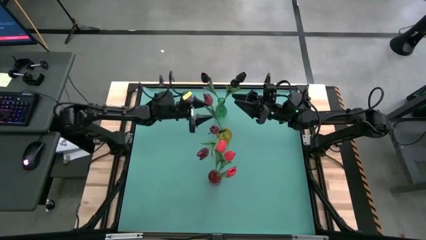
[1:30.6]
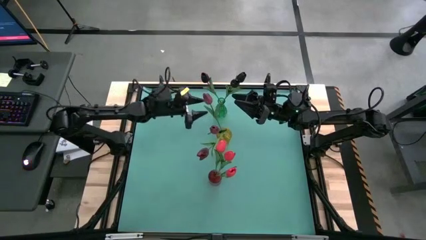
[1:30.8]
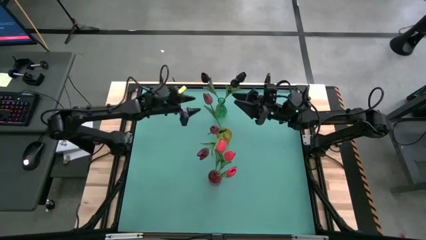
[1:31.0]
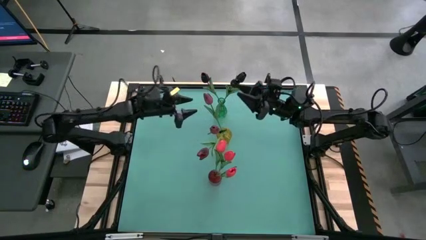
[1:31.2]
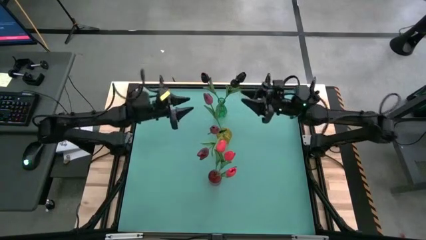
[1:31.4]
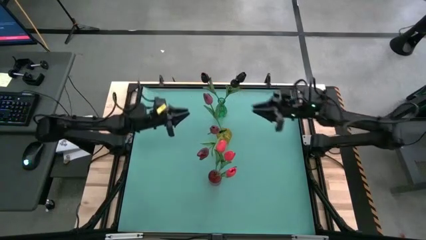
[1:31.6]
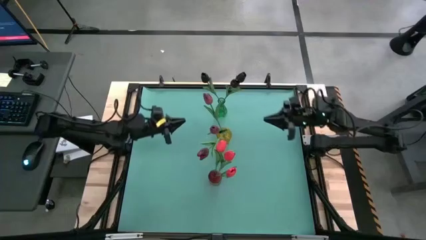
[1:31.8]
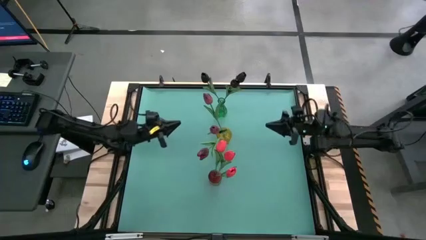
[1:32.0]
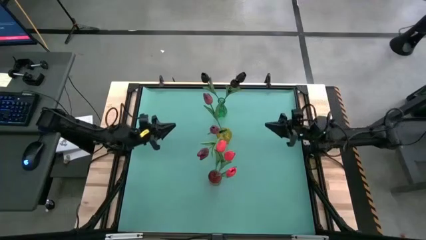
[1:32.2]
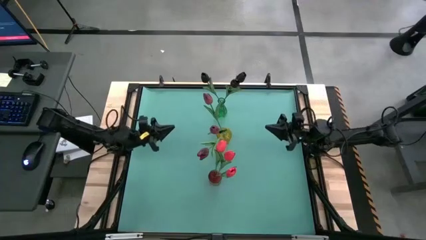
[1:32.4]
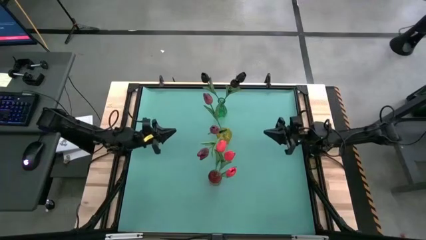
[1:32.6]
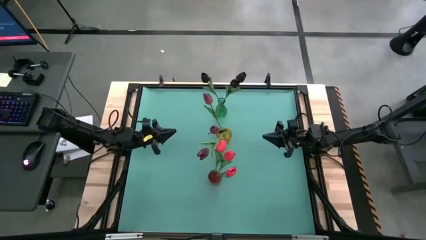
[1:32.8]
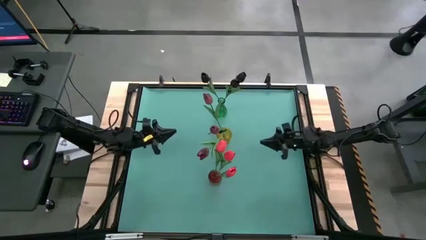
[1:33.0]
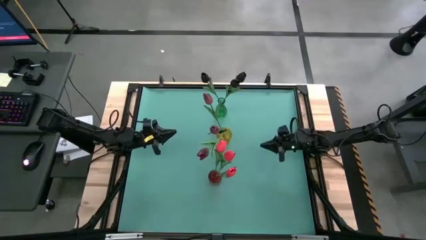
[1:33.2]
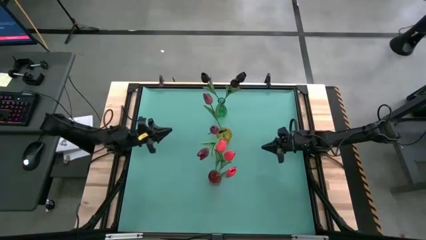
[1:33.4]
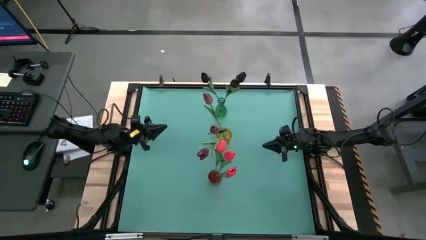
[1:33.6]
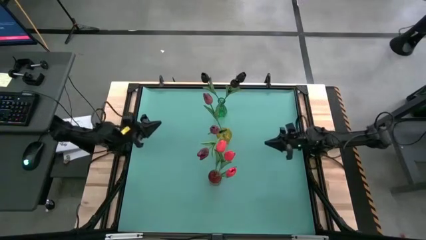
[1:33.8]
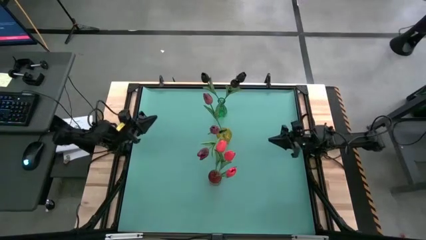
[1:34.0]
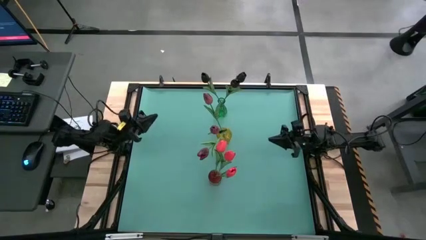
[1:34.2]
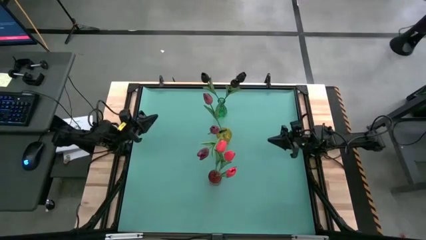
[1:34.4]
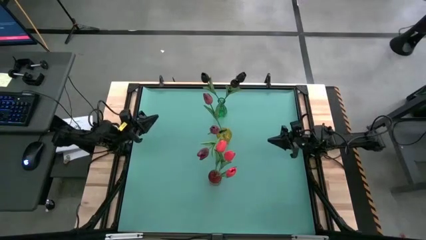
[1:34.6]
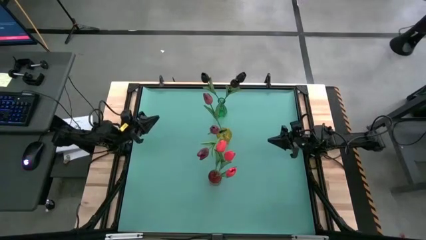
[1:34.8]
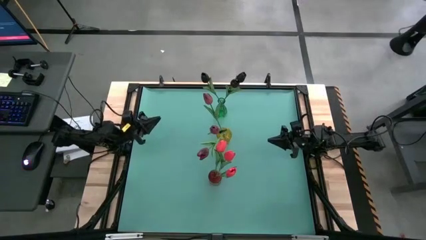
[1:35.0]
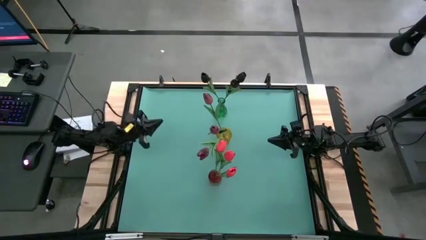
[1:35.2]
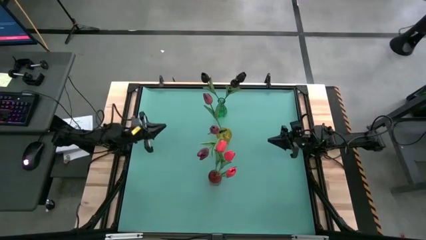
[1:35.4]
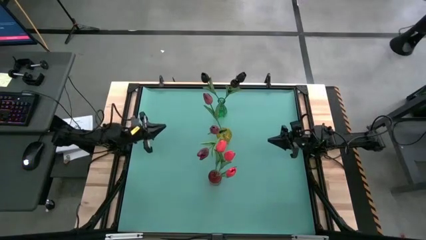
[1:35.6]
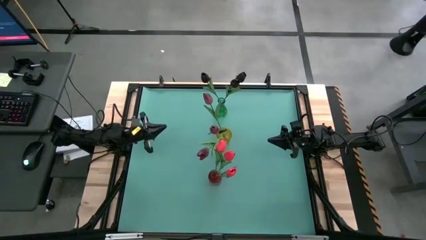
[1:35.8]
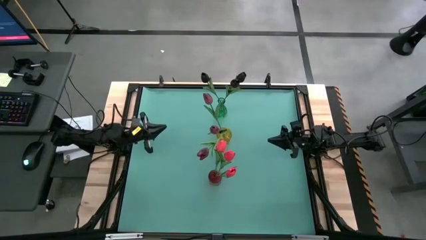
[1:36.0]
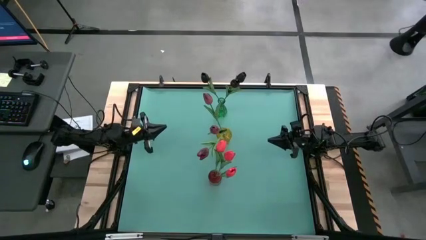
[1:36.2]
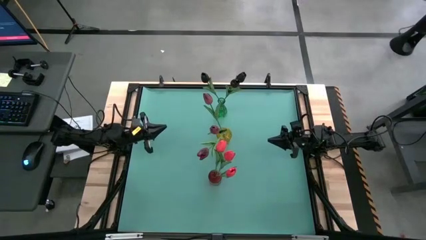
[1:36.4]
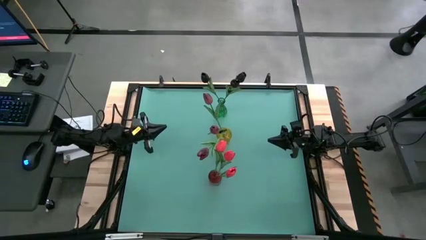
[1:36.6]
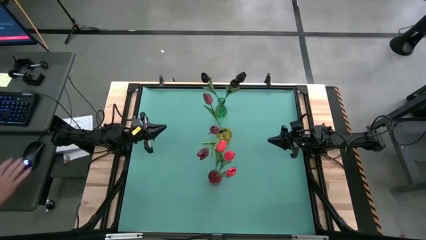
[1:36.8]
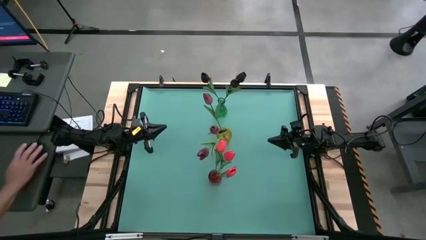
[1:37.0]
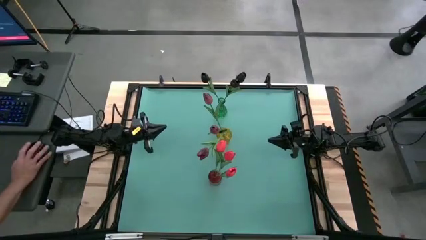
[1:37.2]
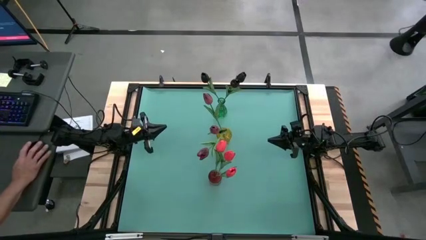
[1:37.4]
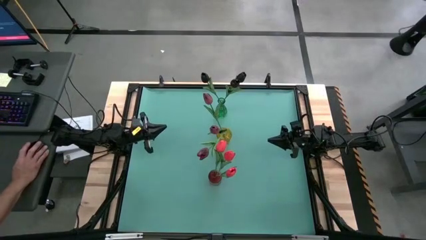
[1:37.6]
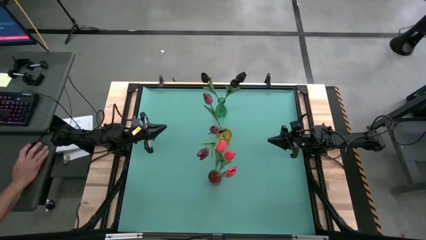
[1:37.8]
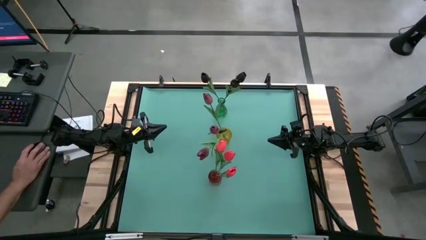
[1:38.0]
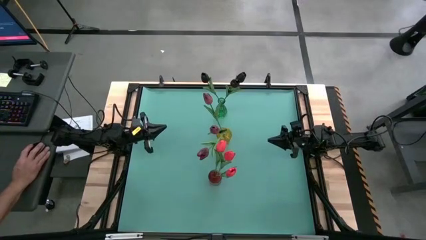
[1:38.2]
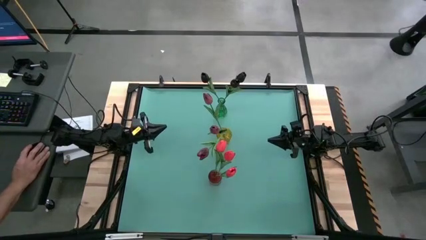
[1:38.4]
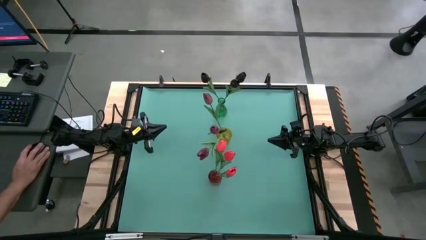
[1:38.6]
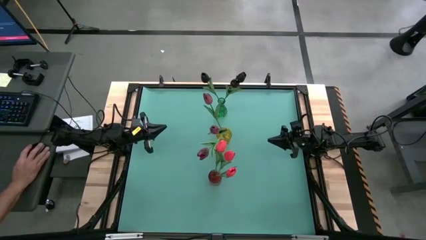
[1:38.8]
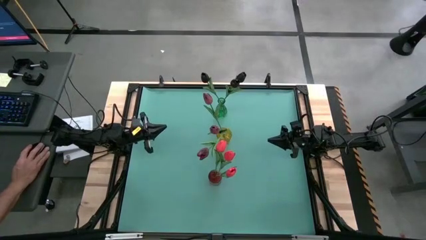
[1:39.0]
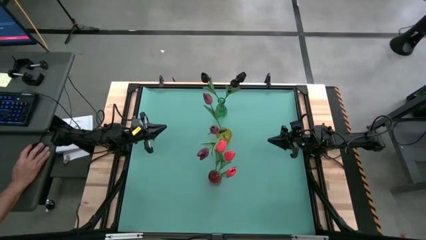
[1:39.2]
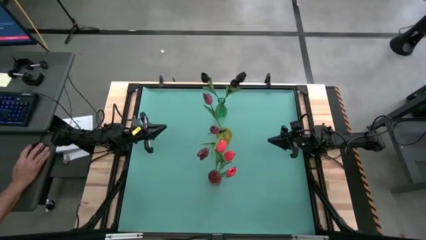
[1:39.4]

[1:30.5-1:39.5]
Task: Sort flowers into vase by color
Return to Home Position
